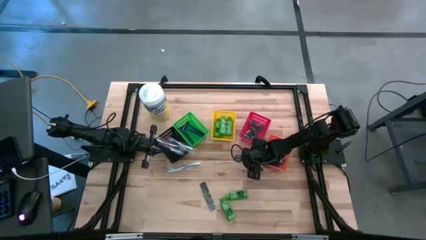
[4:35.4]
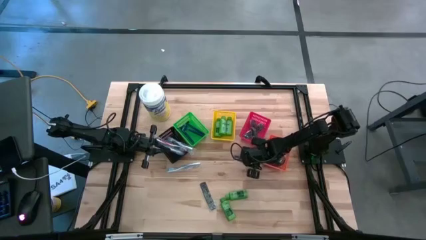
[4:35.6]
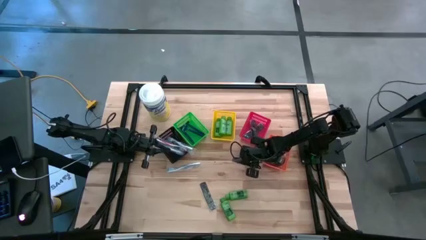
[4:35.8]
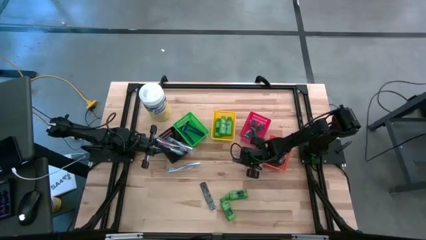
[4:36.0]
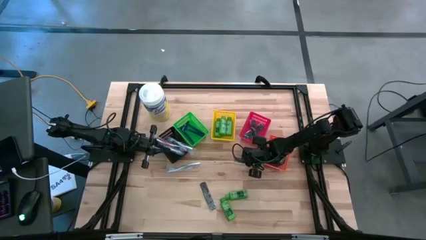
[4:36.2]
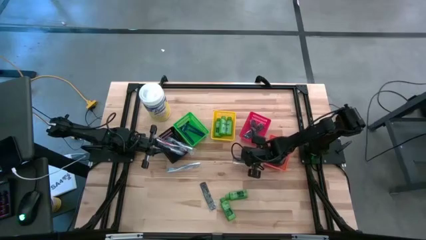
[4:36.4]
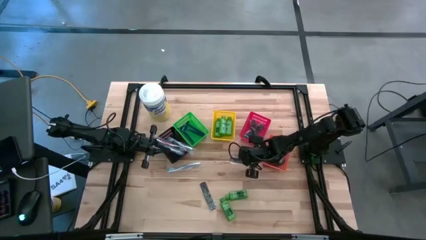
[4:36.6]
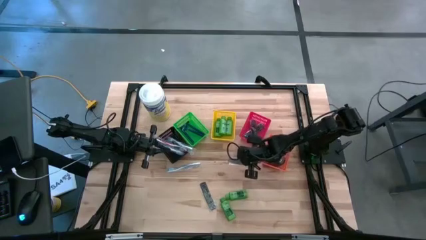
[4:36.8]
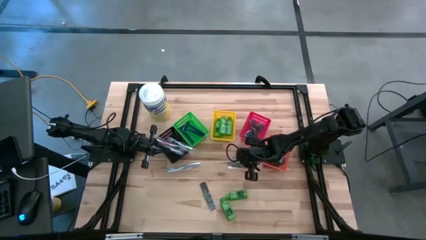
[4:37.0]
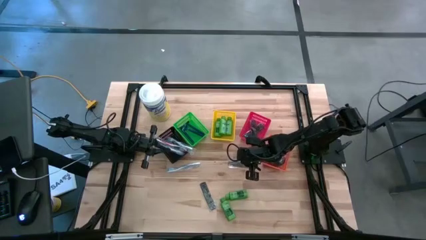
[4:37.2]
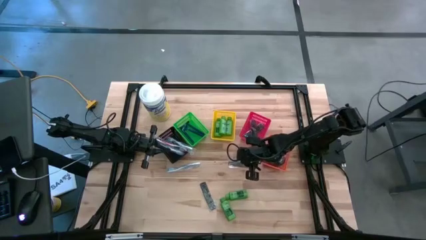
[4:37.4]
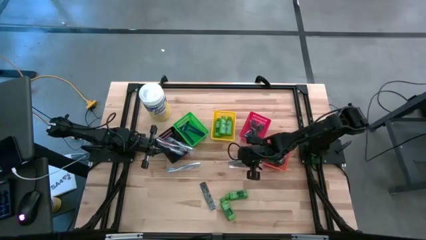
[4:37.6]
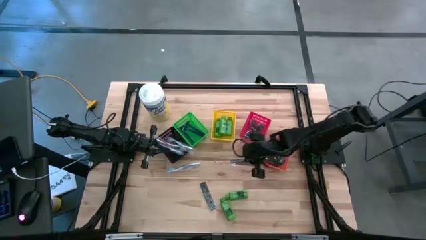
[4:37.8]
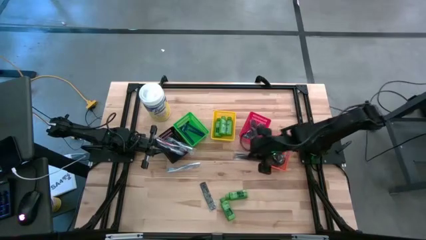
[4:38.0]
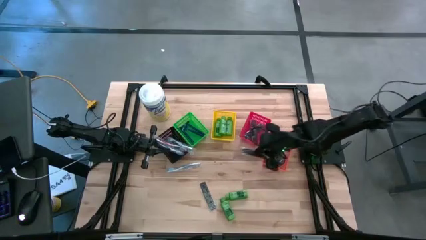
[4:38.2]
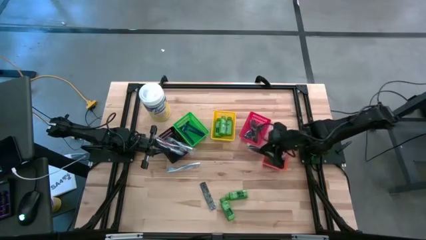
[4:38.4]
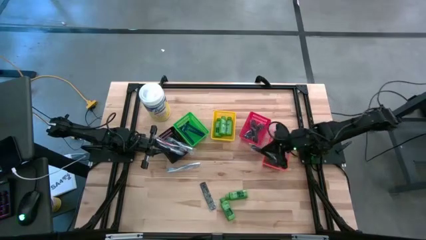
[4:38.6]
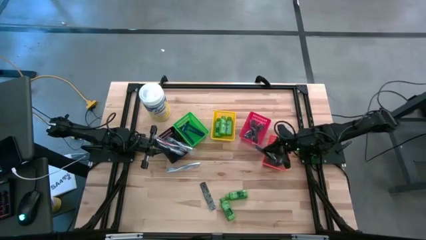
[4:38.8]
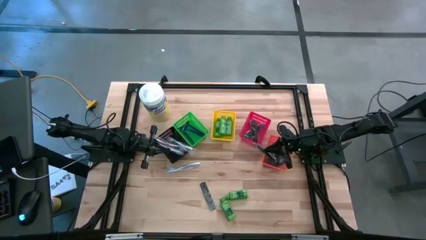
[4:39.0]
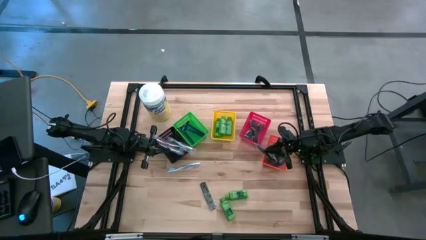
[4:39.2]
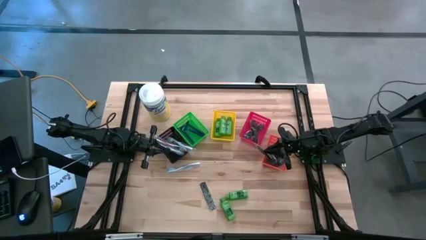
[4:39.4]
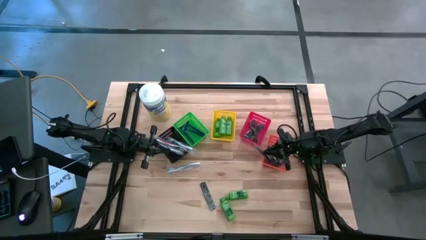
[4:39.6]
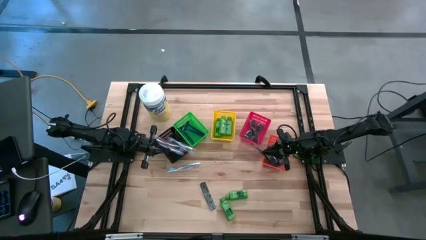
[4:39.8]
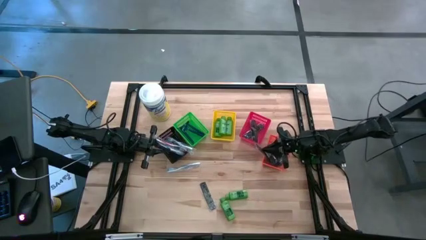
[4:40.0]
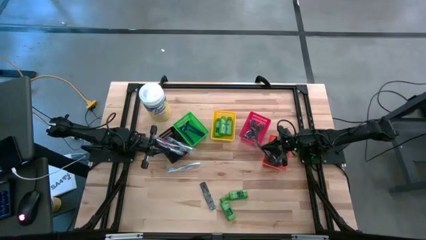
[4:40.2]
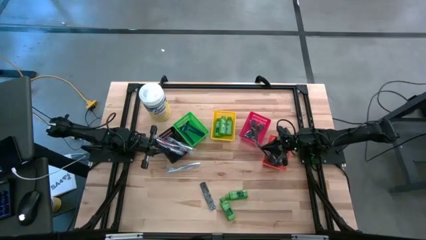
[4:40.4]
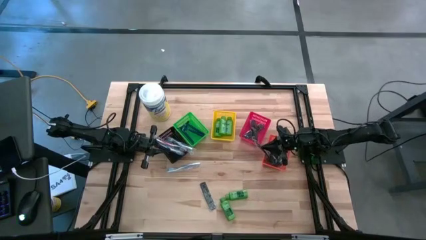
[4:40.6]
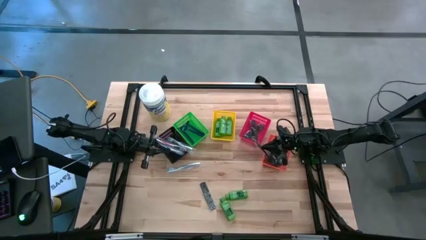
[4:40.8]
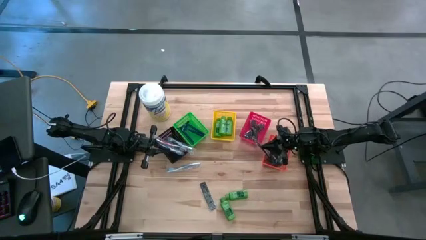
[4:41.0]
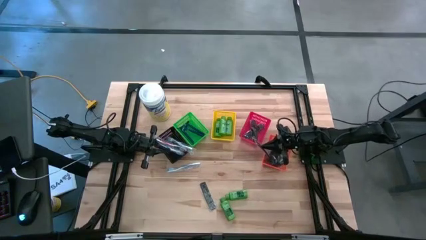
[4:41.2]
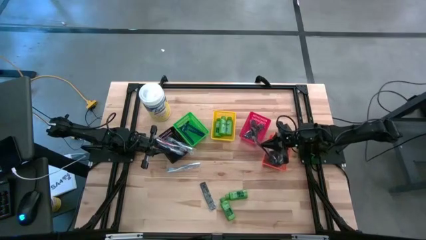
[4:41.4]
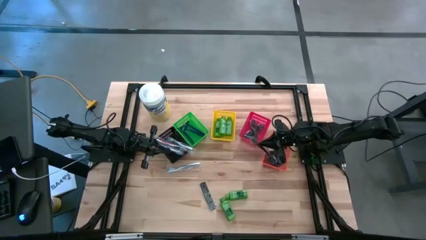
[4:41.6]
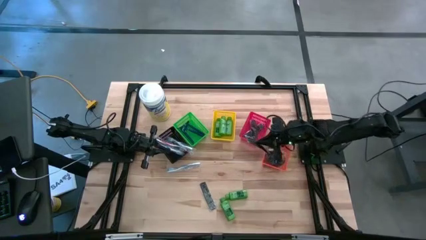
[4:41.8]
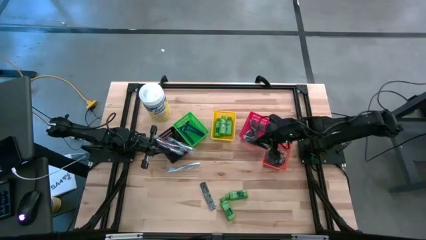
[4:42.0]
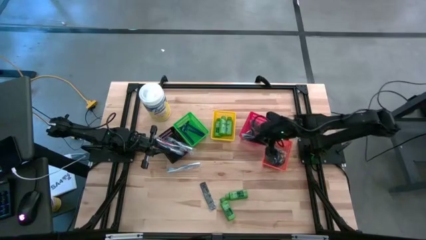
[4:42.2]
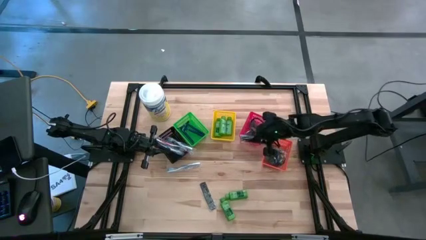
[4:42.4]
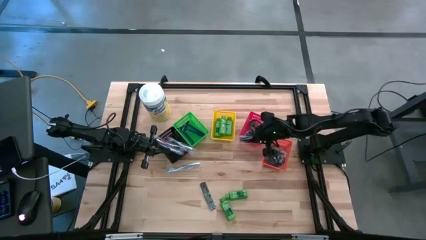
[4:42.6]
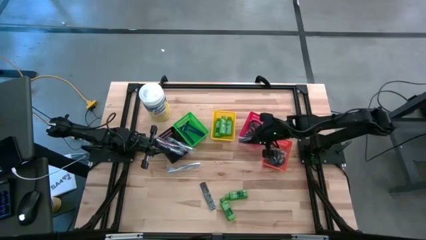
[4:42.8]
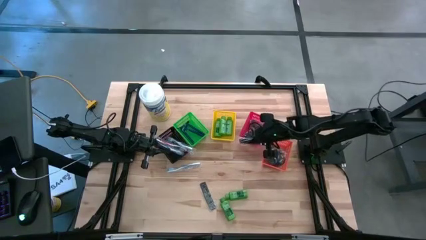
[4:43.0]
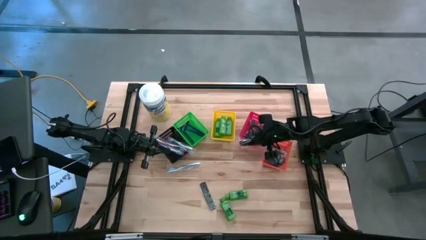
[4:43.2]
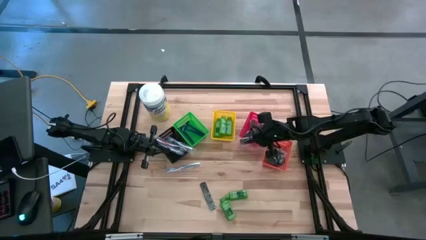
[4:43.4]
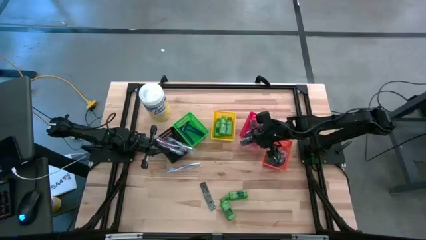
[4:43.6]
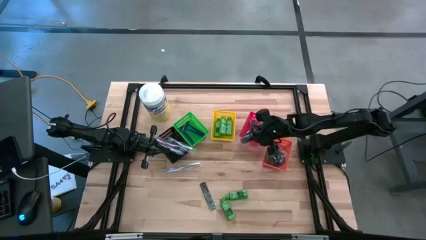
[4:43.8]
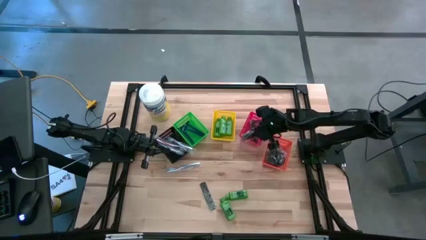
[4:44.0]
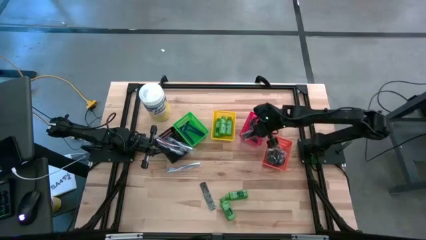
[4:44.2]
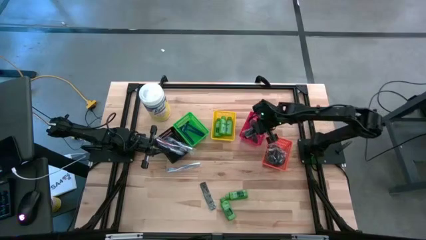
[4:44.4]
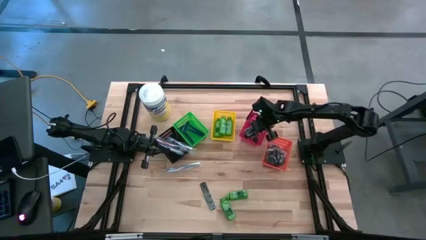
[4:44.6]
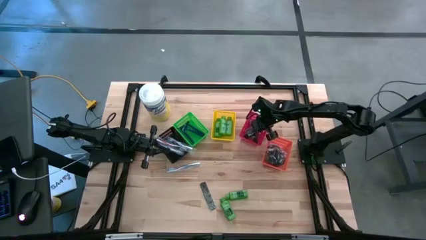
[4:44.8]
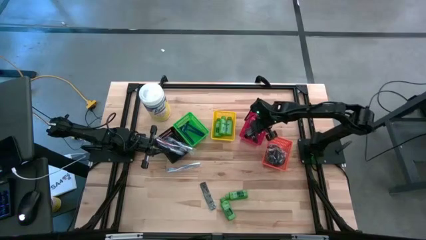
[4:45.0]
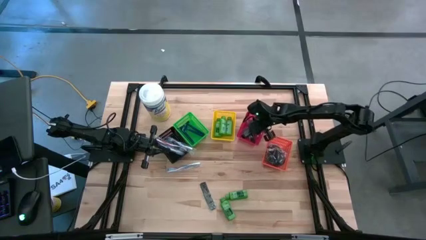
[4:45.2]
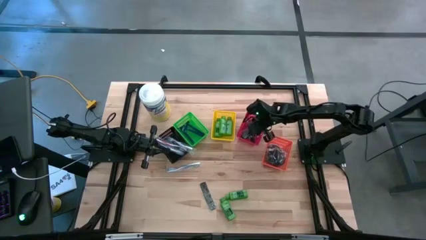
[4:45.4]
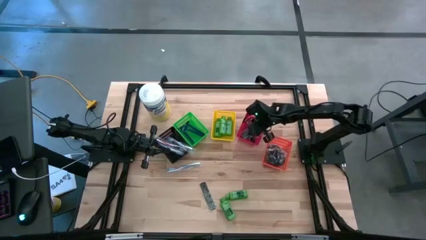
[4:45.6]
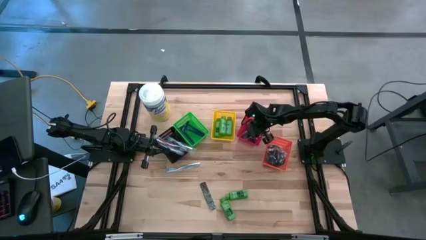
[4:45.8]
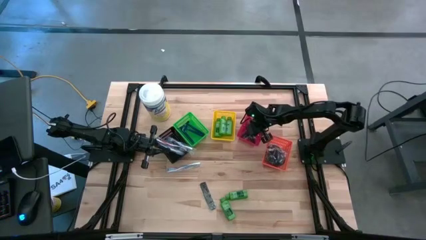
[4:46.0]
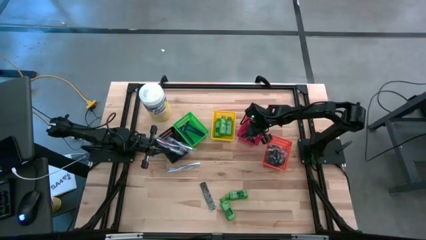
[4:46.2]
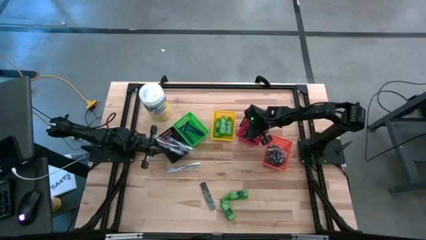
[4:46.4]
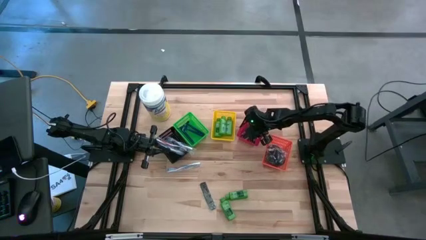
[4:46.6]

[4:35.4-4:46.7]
Task: Pick & Place Travel size toiletries
Put the top black hair comb into the red bin
